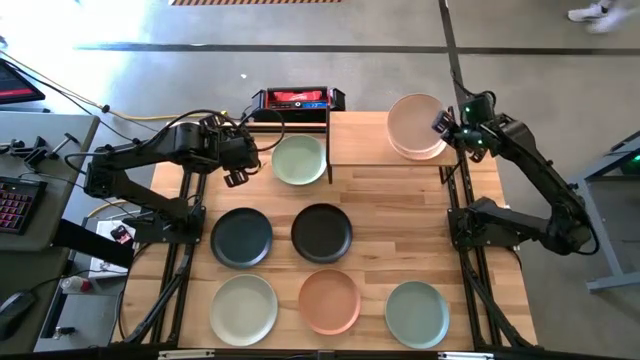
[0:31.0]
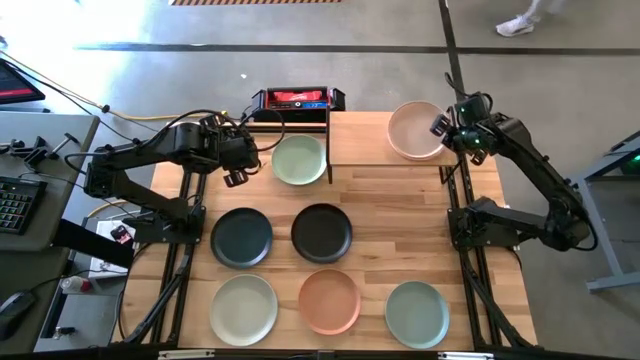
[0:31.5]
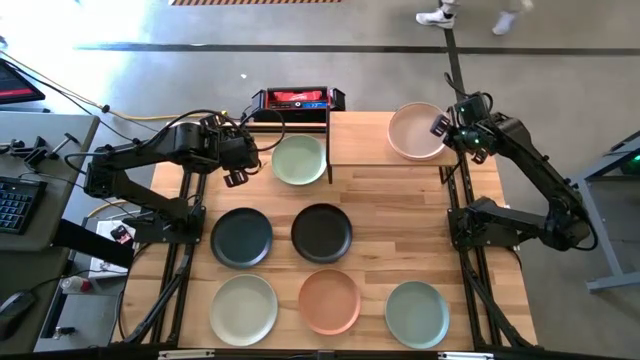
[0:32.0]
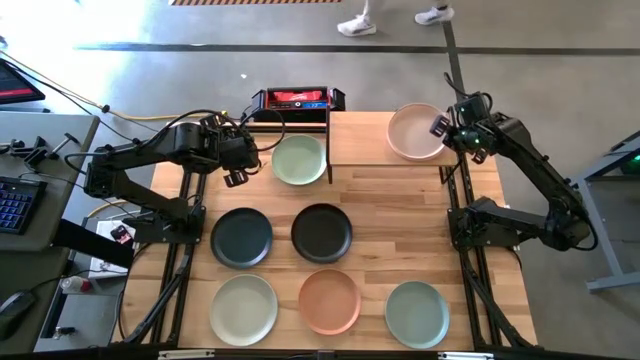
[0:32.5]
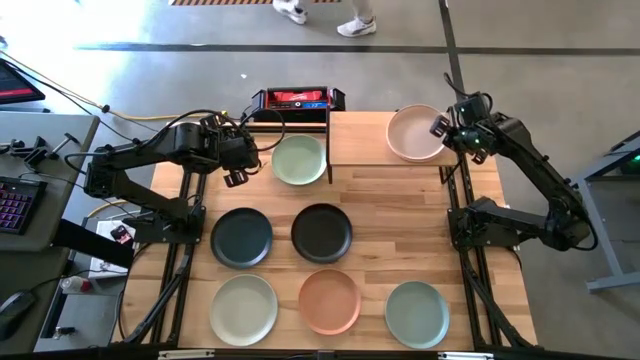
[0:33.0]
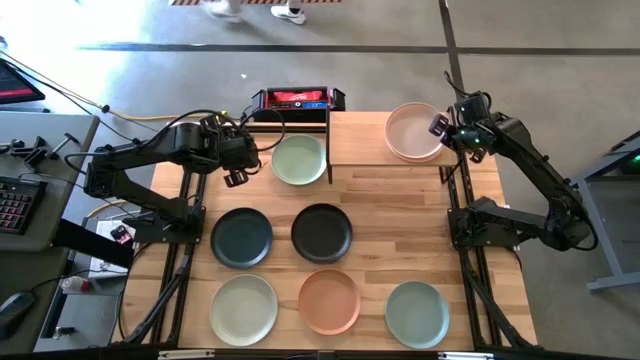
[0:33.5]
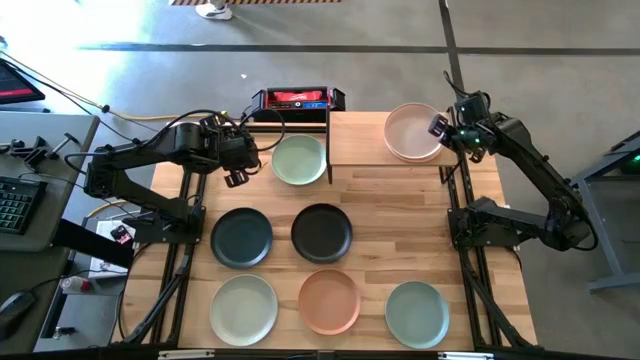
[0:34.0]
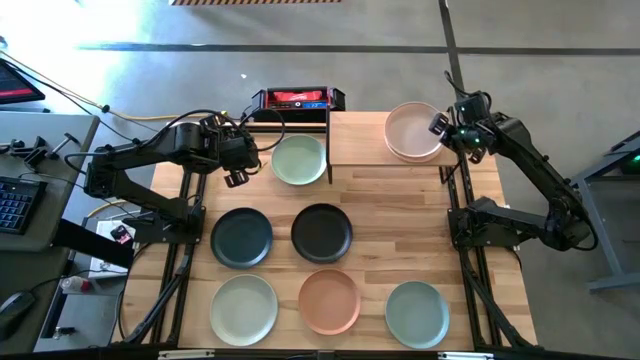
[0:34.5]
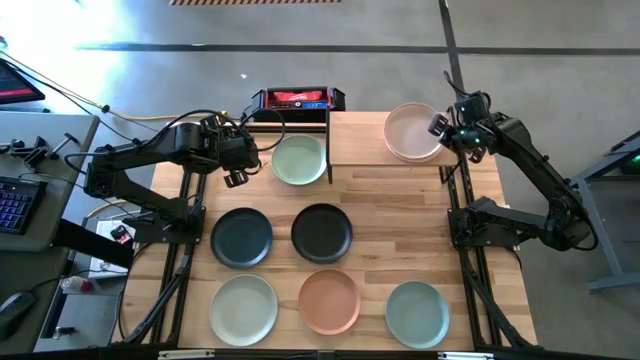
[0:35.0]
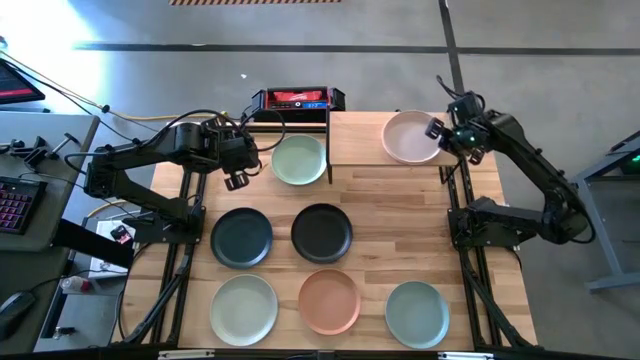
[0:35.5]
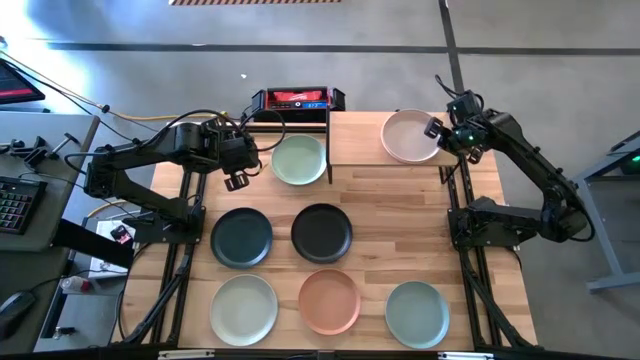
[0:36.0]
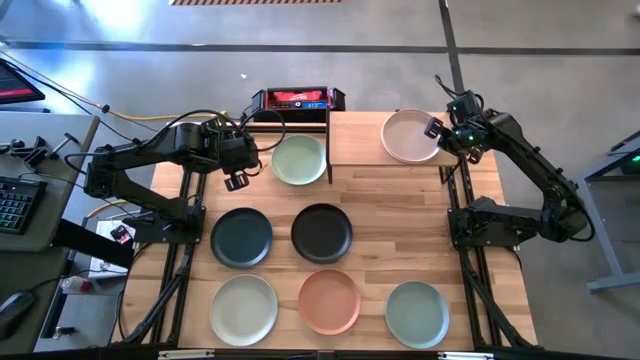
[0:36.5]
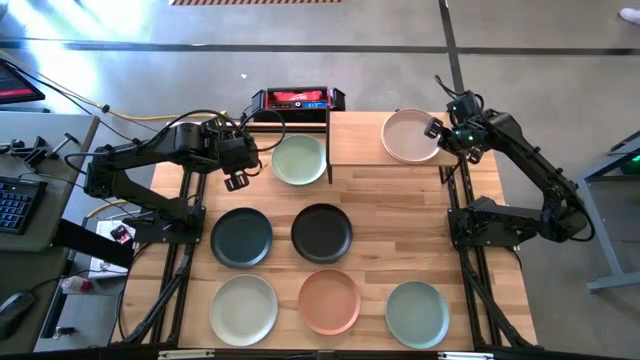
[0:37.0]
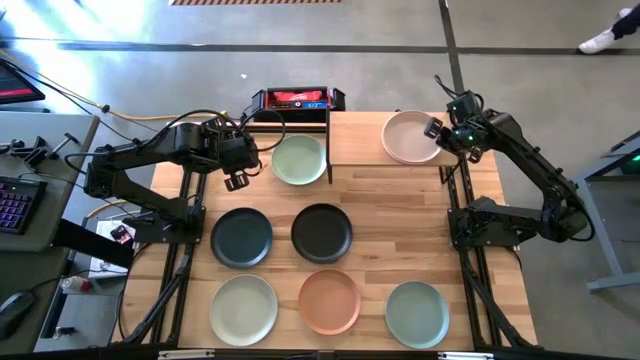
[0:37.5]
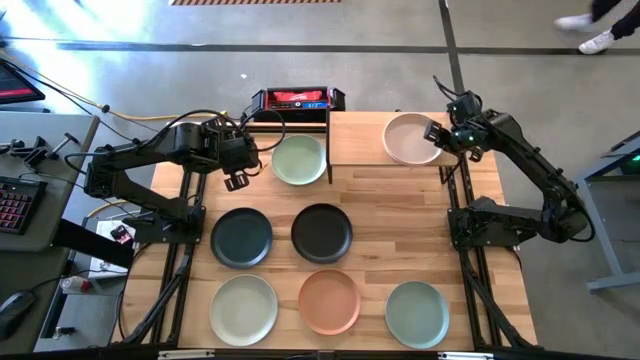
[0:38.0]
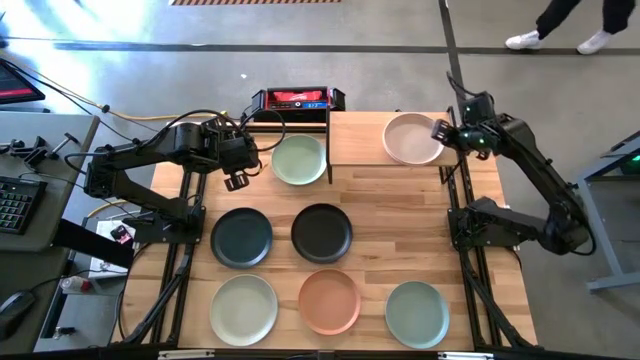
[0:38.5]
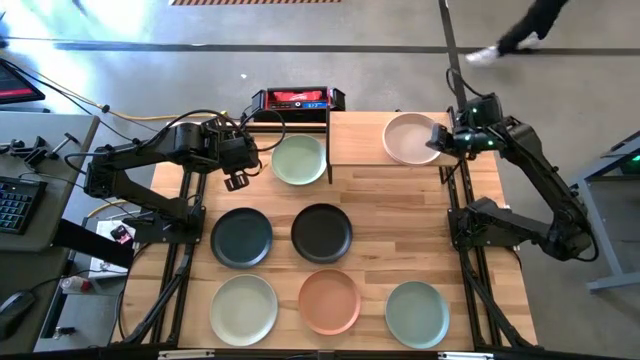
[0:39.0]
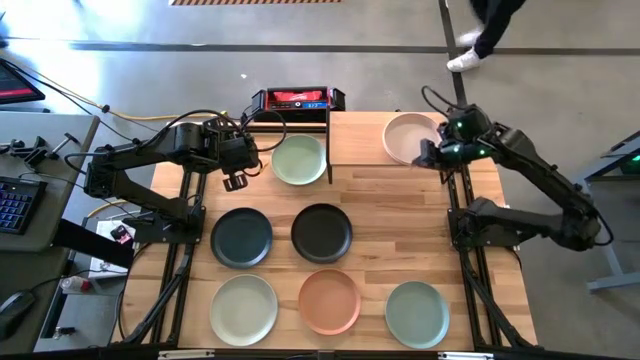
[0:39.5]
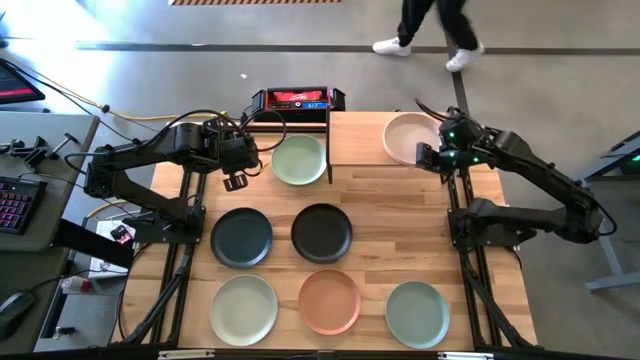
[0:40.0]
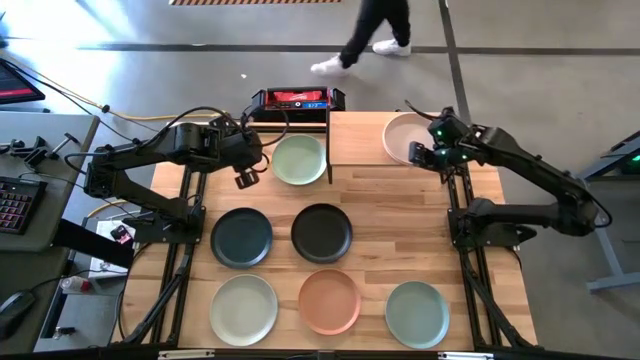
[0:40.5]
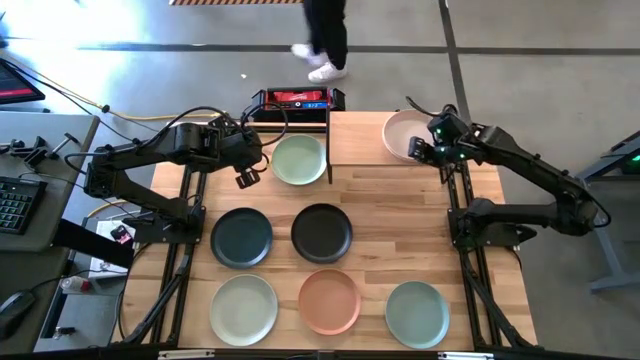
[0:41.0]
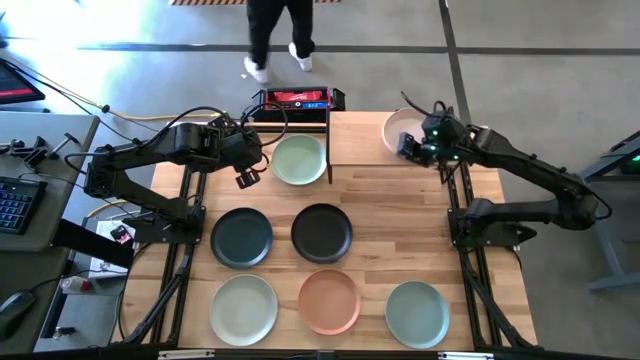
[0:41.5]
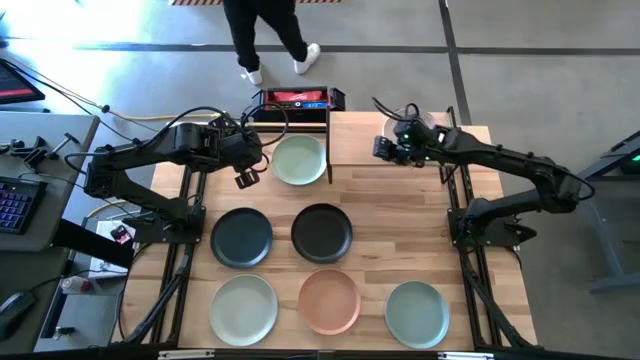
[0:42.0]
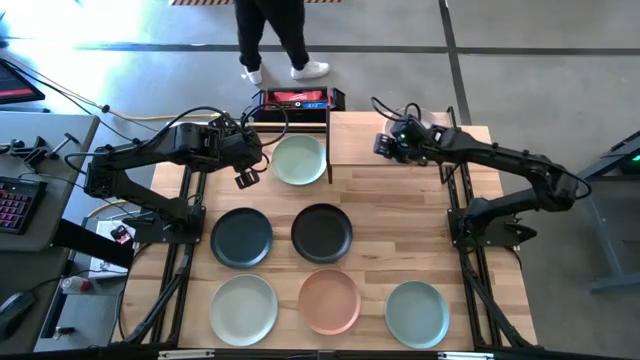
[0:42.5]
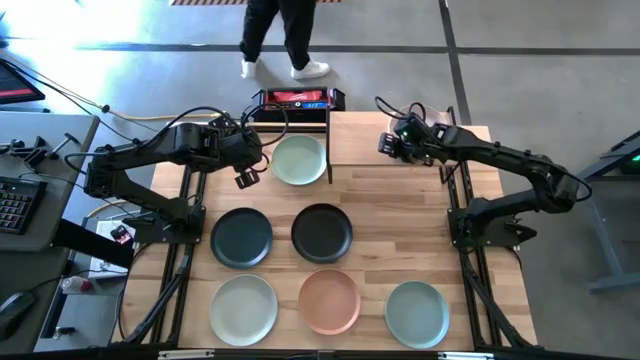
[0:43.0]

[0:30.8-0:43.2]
Task: Place and stack plates onto a shelf
Stack the white plate on top of the light orange plate on the shelf

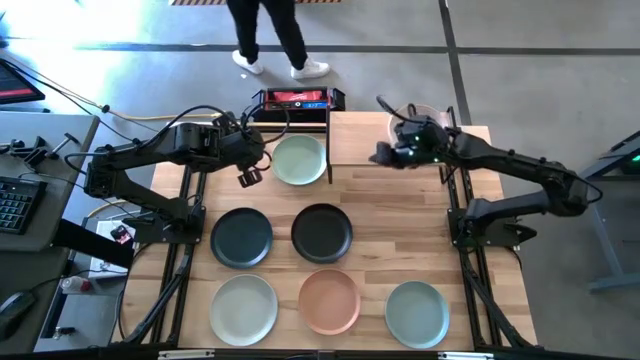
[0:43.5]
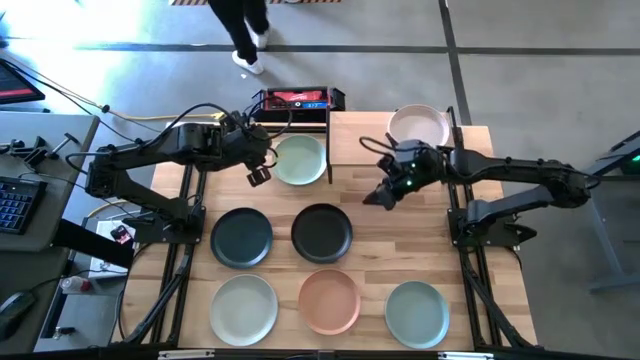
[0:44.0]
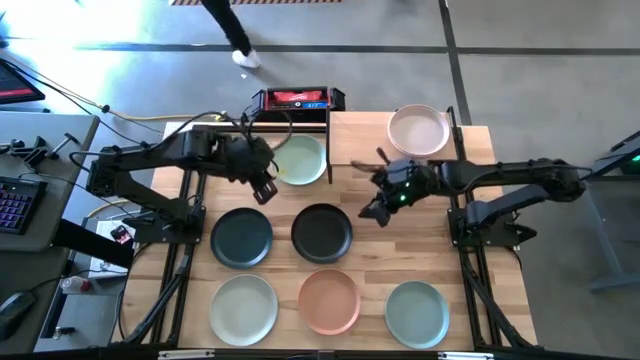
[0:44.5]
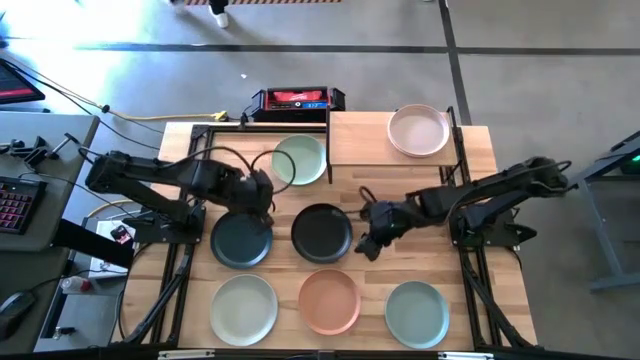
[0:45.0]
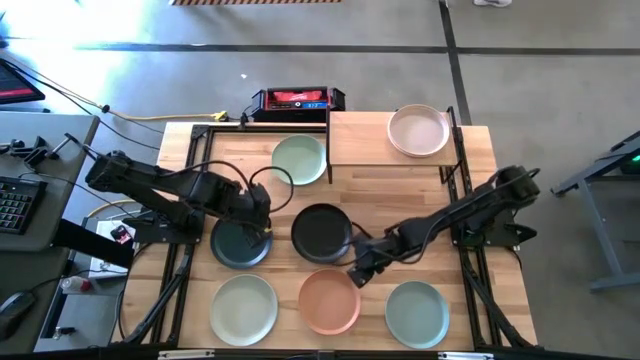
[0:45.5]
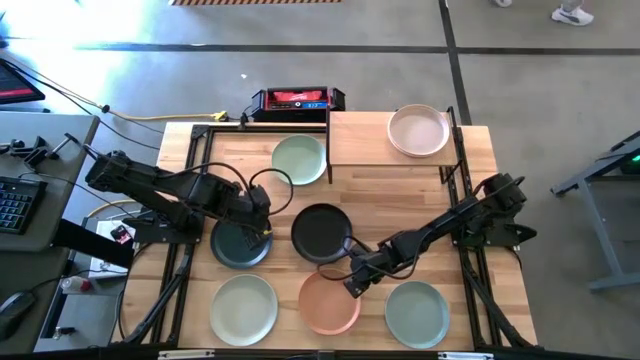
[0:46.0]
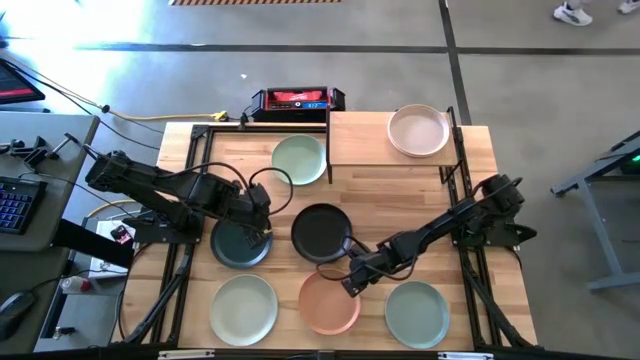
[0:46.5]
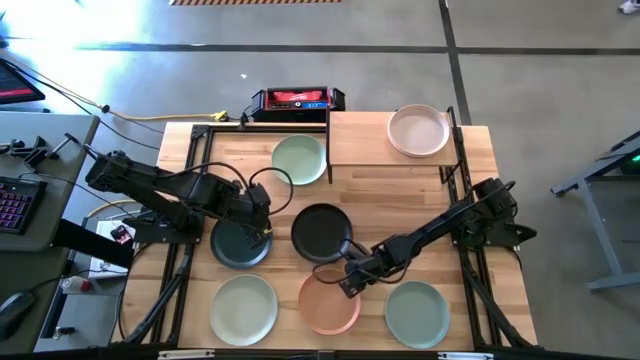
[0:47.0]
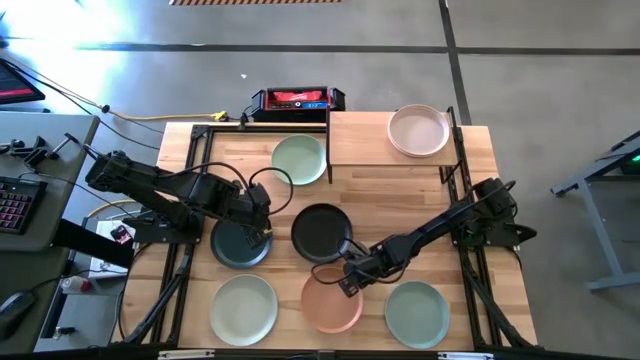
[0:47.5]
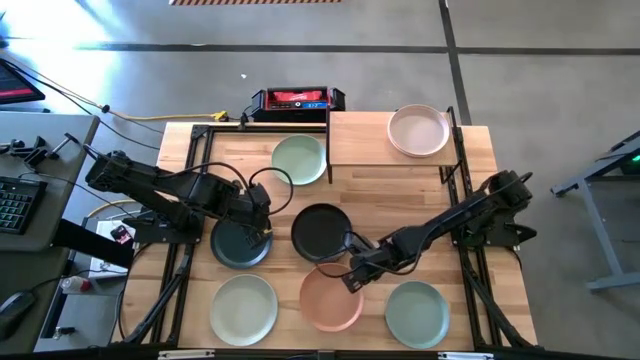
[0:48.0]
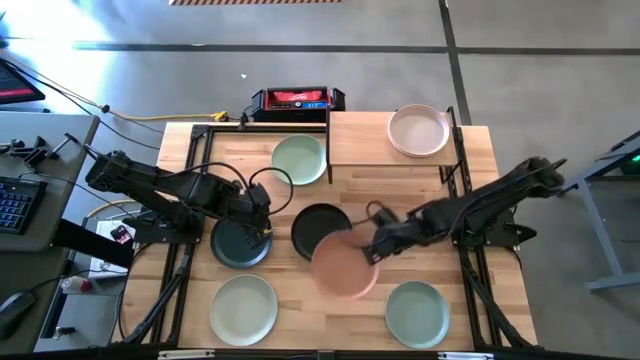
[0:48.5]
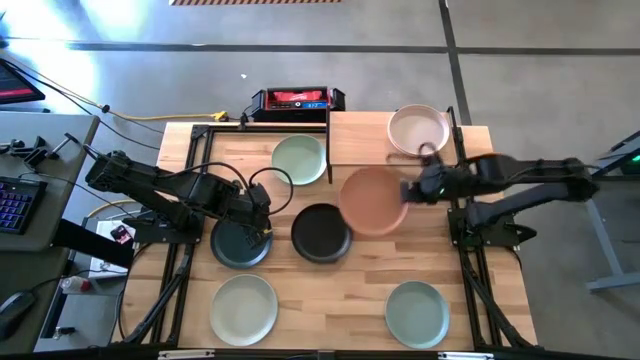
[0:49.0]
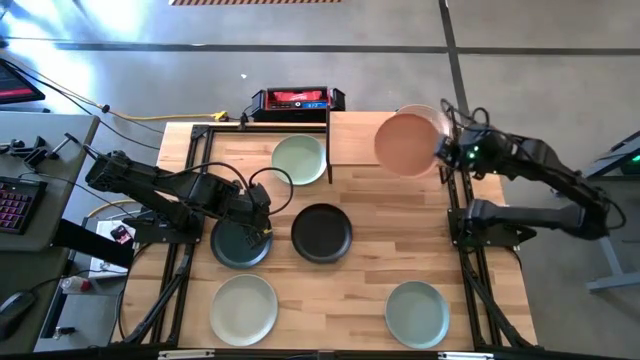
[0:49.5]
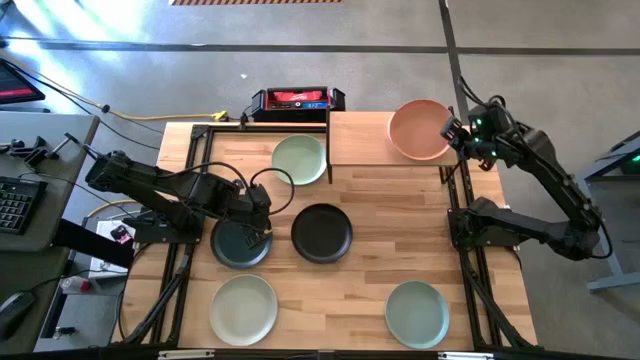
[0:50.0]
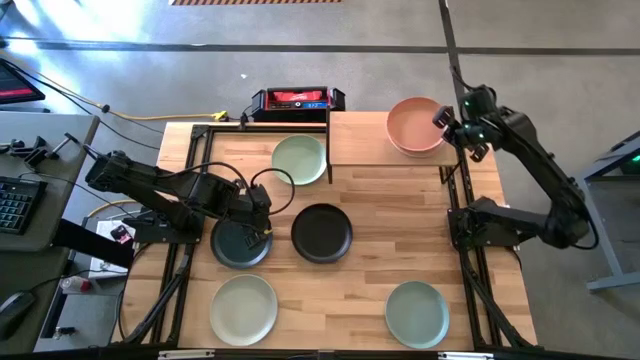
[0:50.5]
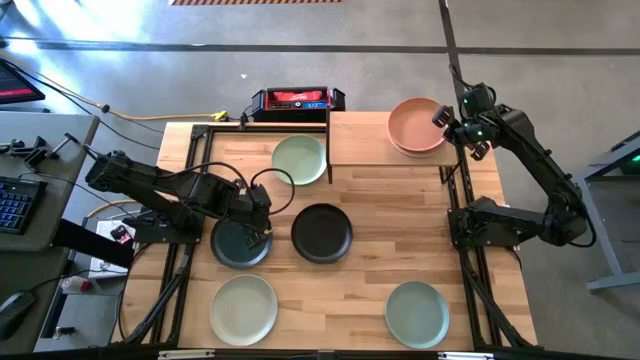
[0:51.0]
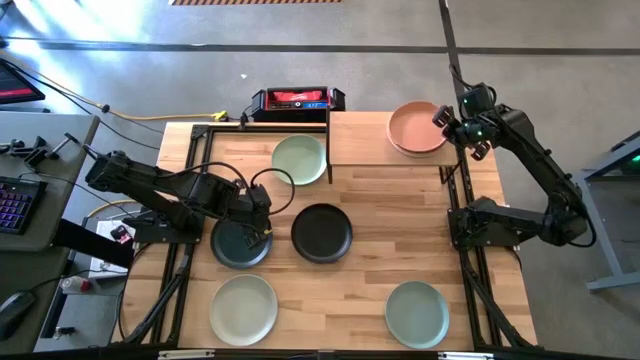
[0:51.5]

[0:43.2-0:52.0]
Stack the orange plate on top of the white plate on the shelf

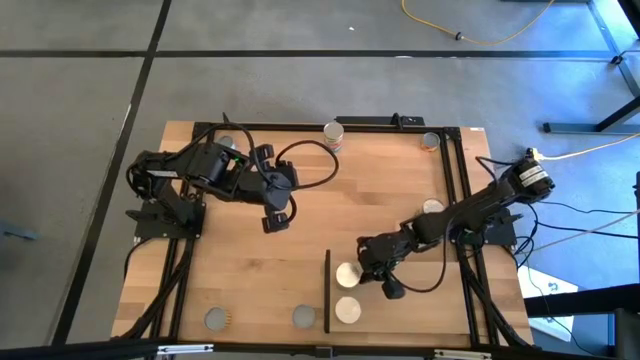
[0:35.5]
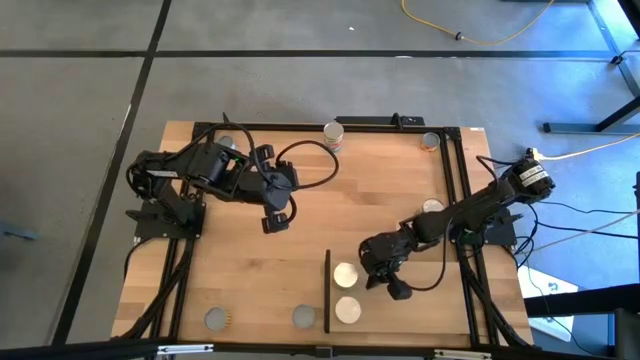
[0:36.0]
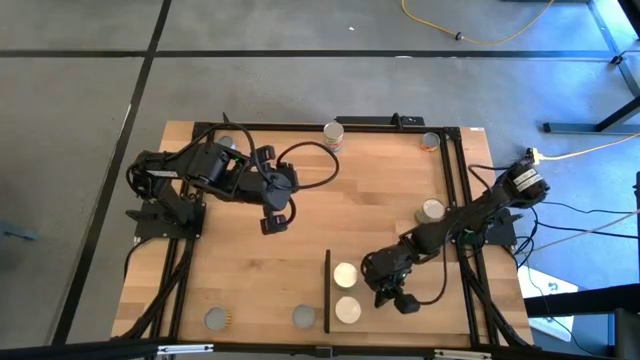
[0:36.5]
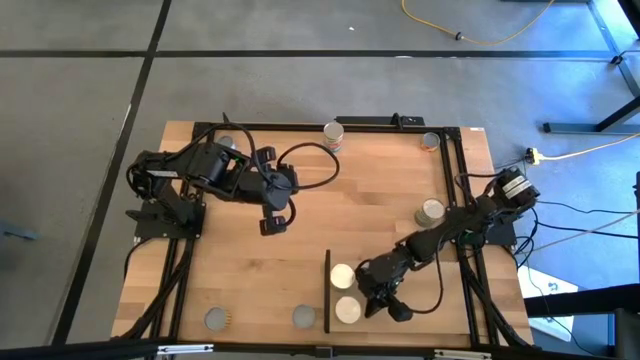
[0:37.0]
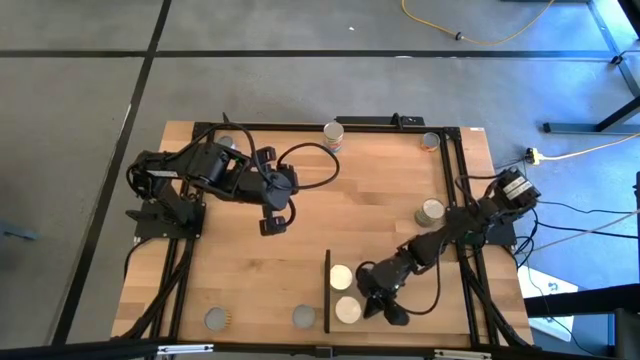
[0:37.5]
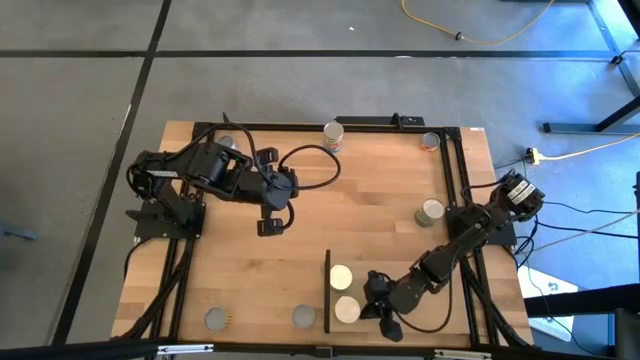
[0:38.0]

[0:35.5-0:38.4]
Task: Pick and place cans onto a shelf
Adjust the canned carrots on the shelf
